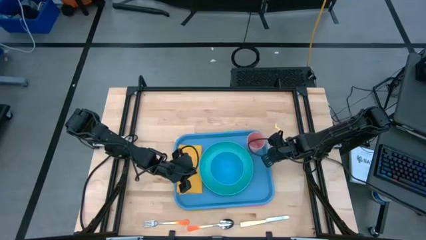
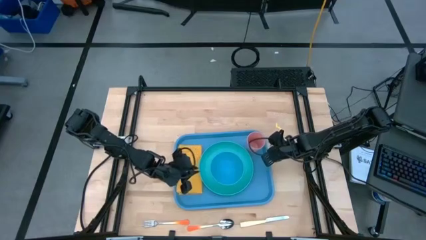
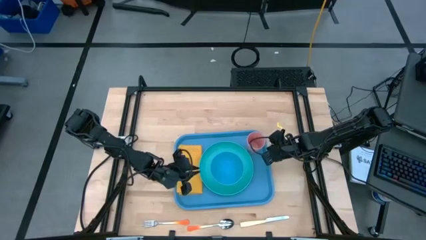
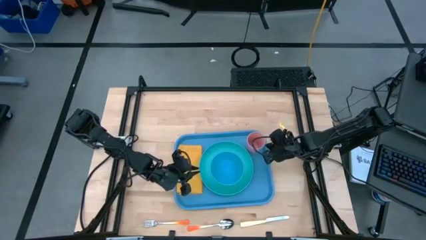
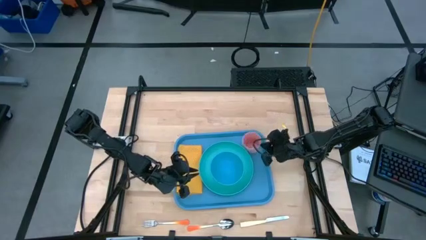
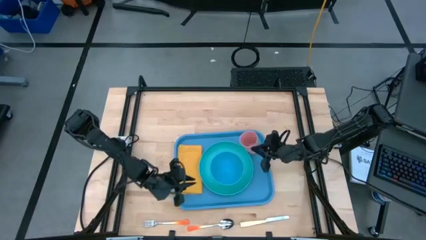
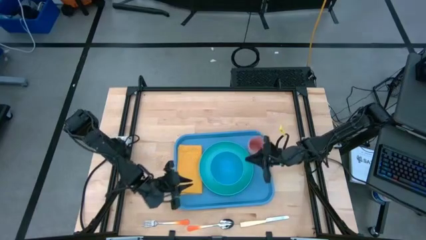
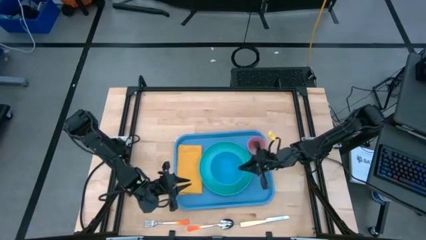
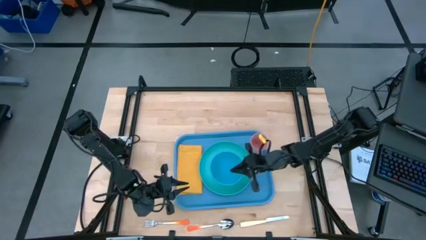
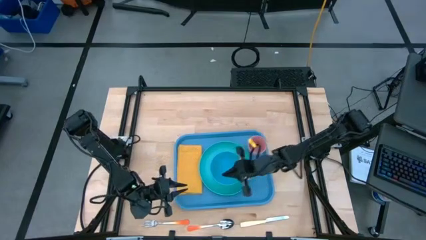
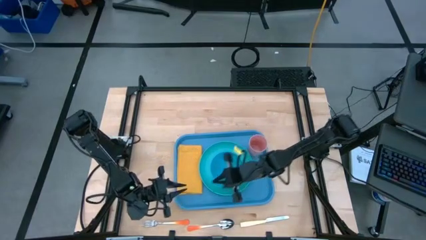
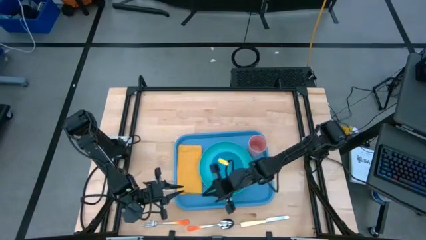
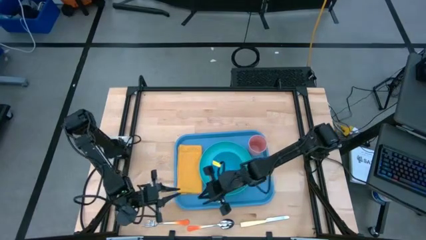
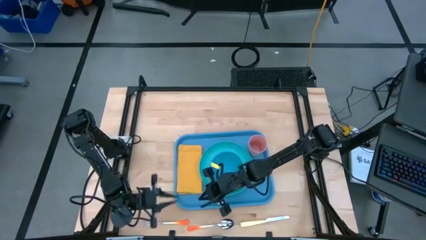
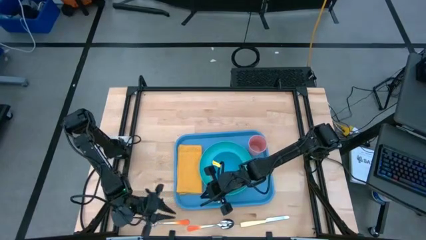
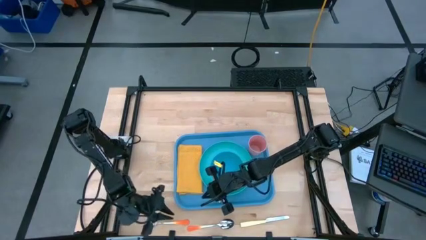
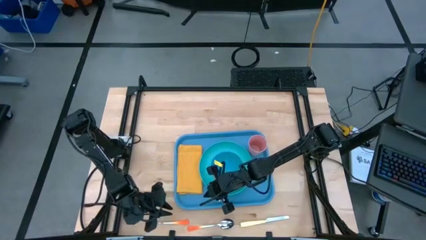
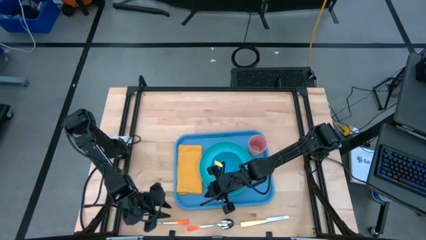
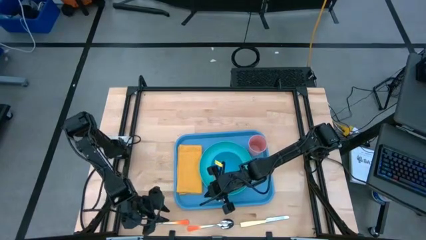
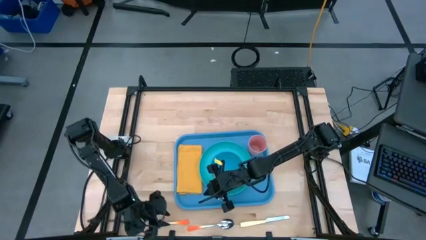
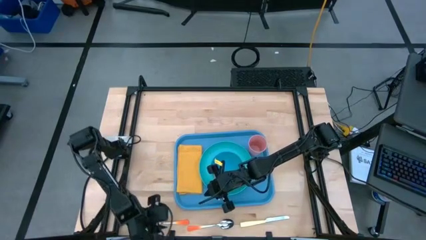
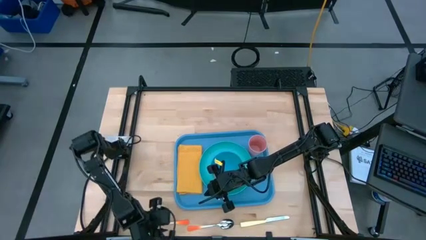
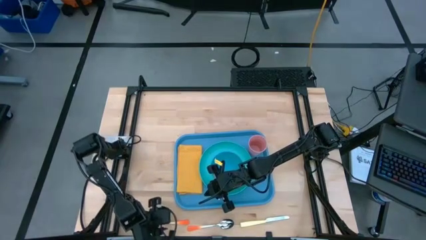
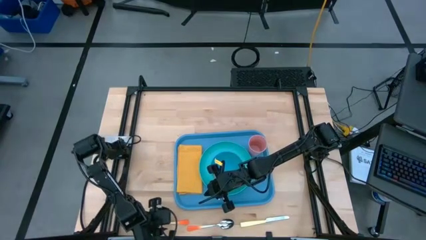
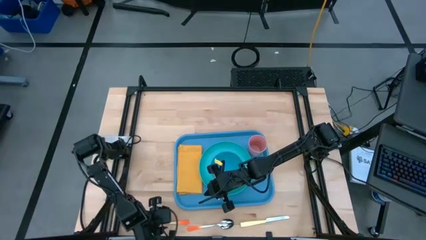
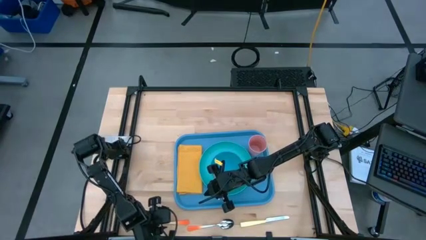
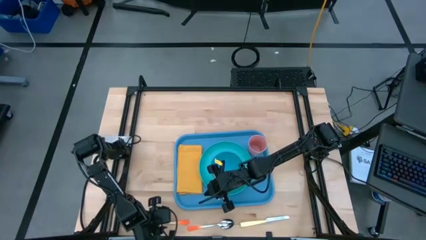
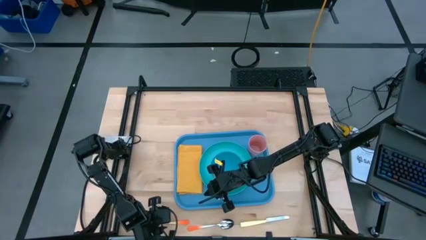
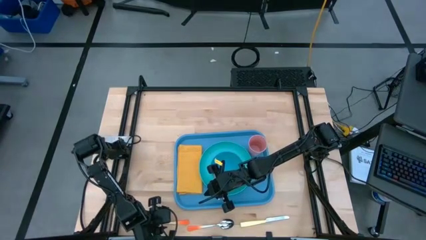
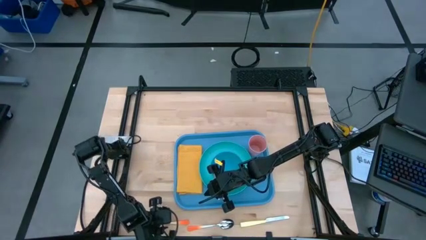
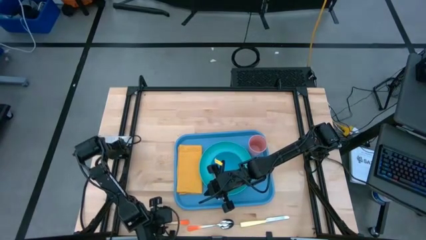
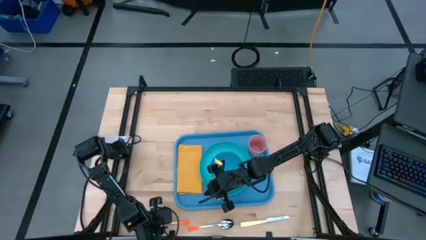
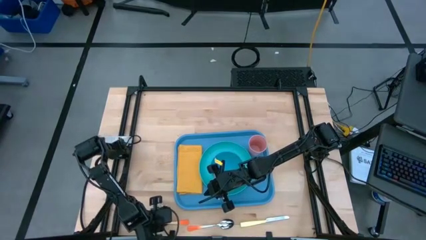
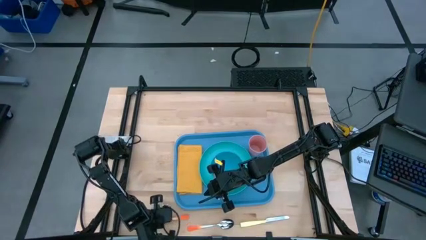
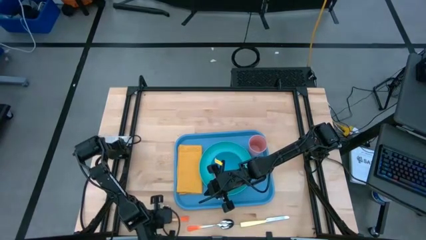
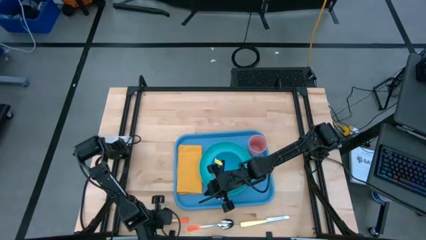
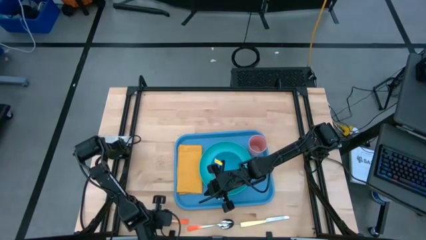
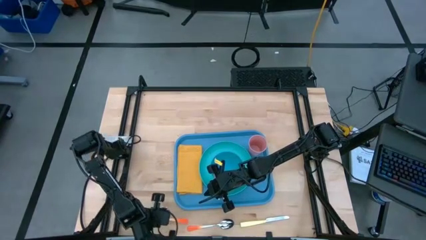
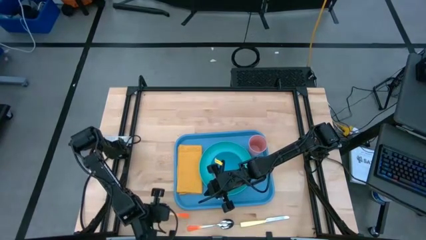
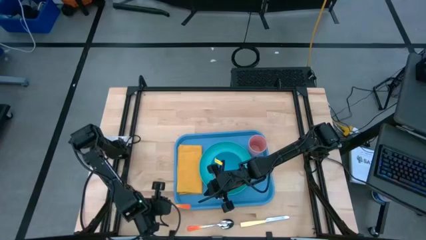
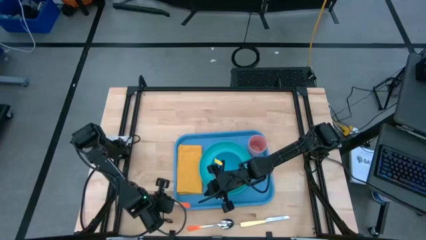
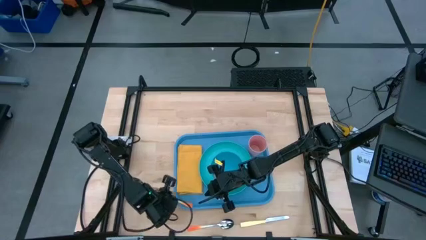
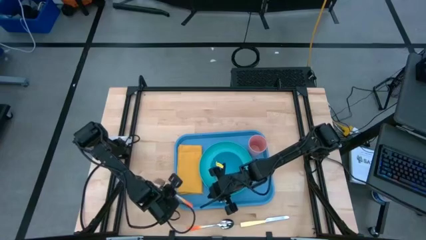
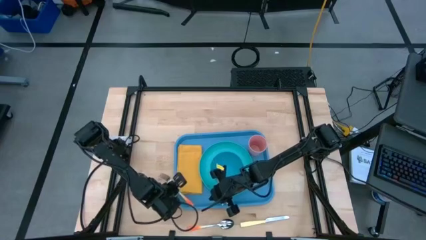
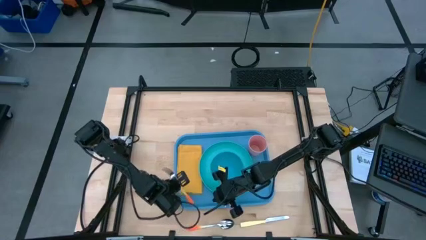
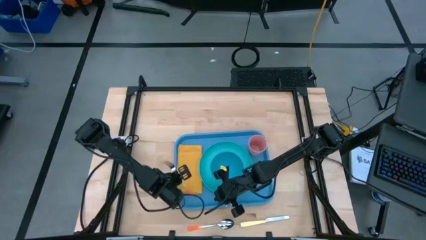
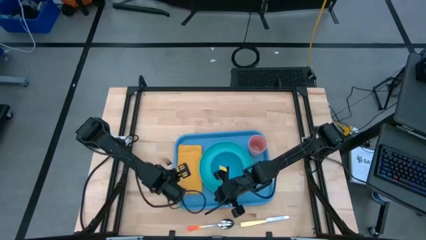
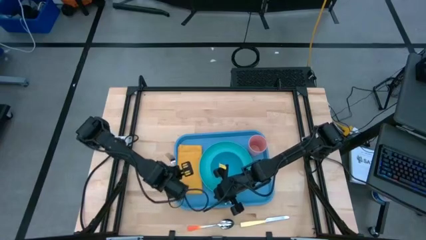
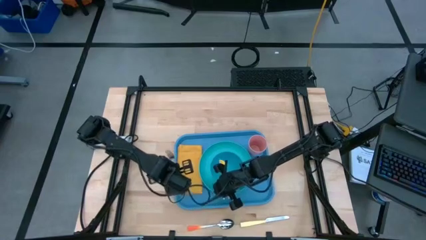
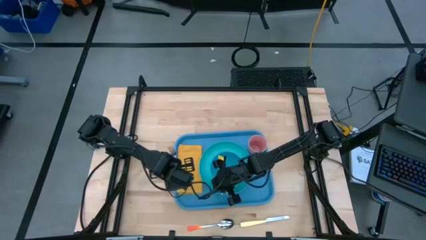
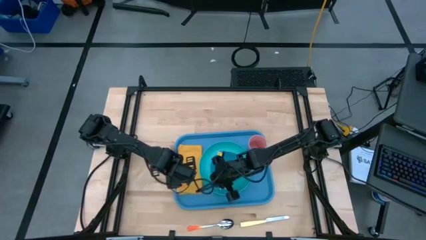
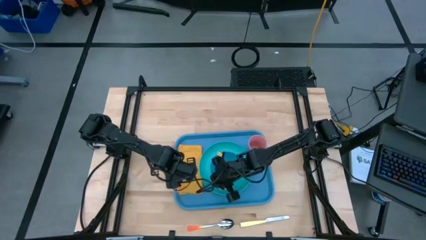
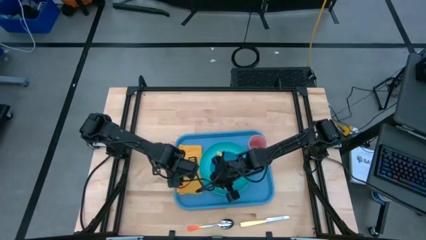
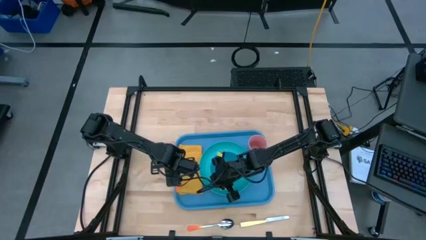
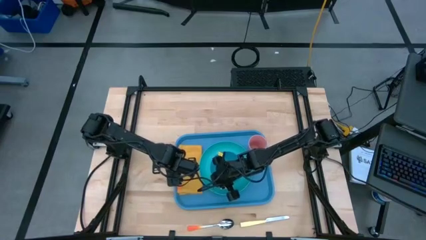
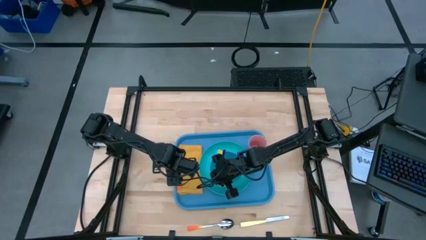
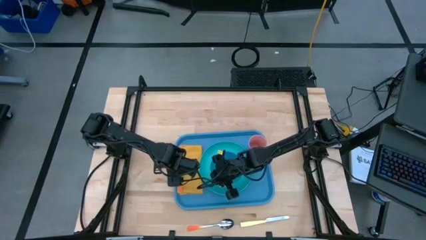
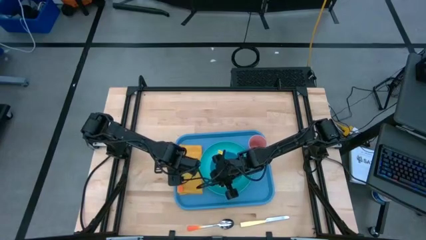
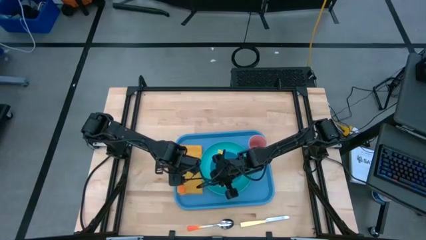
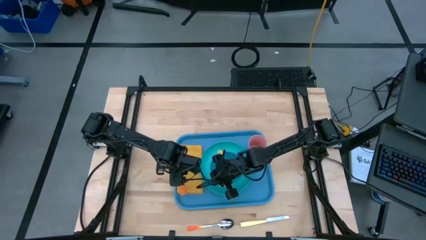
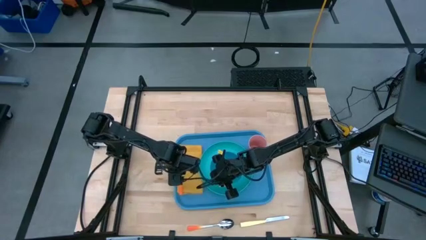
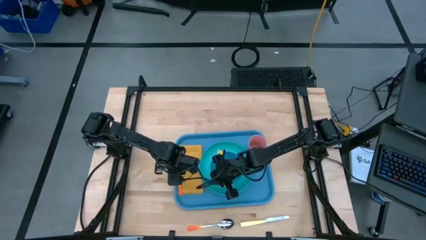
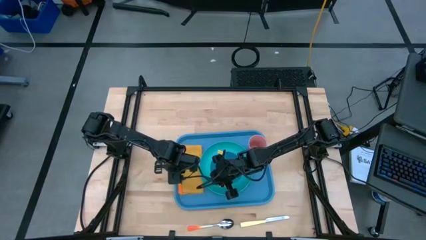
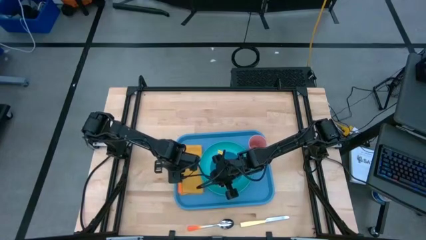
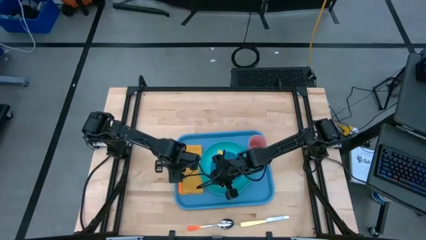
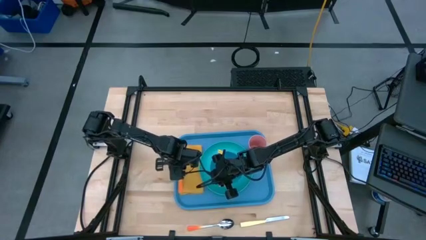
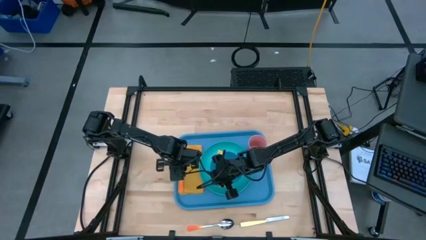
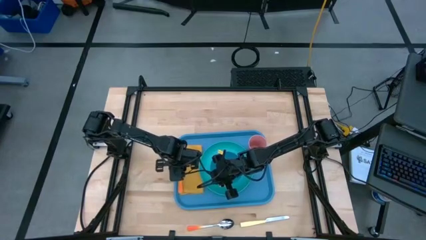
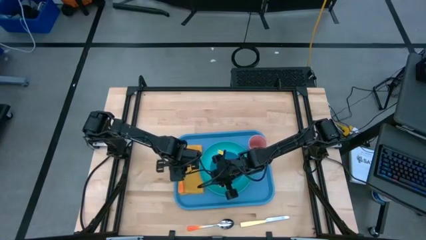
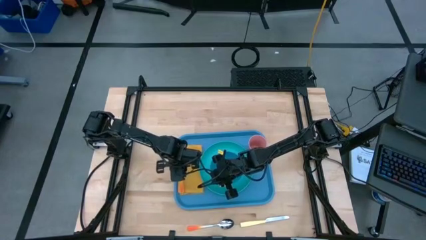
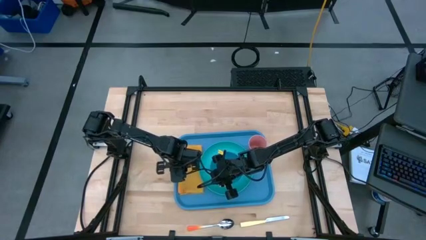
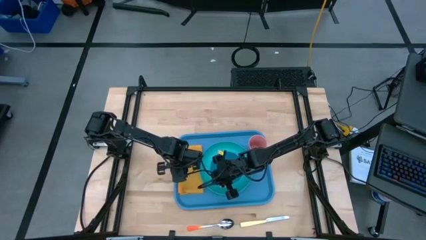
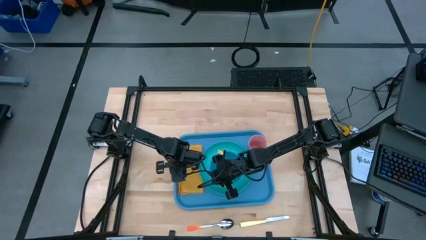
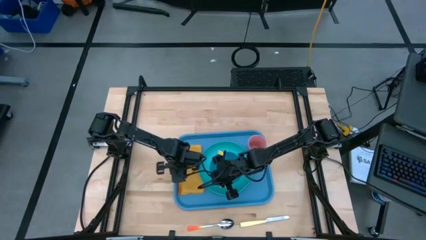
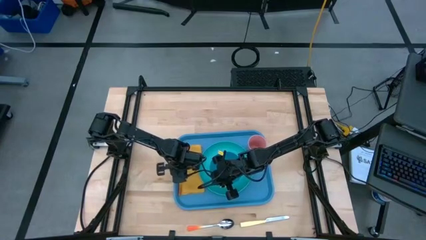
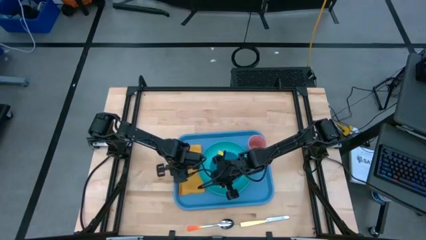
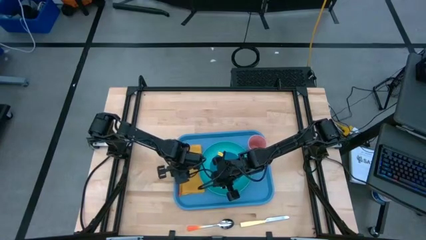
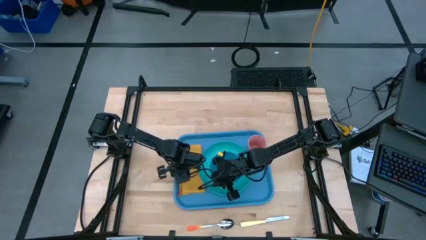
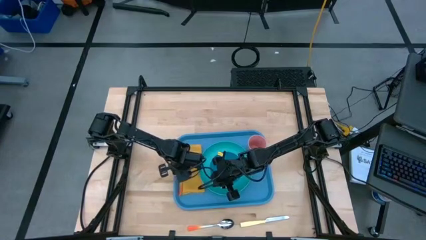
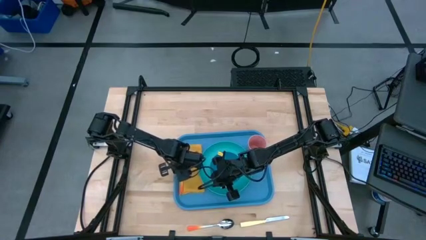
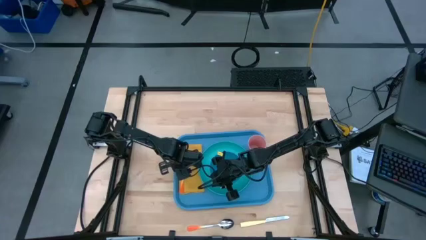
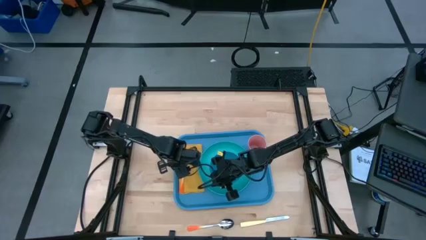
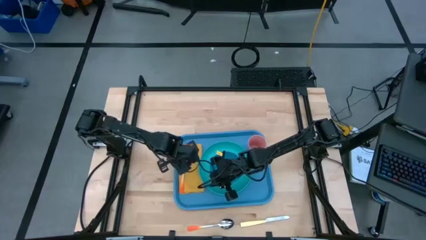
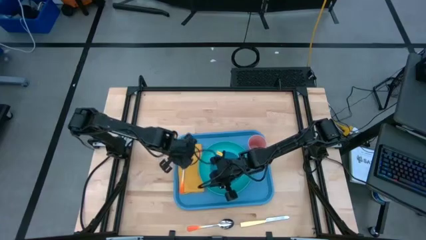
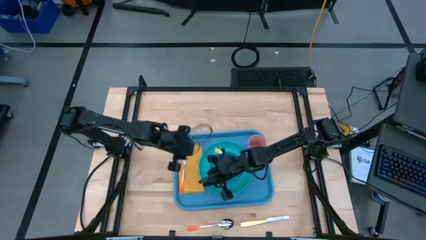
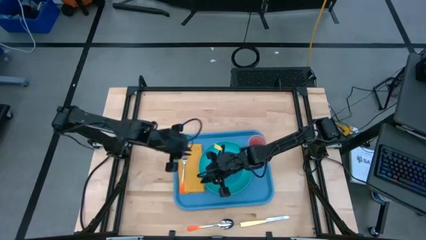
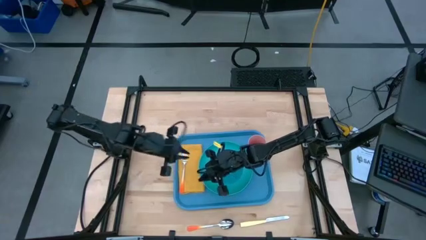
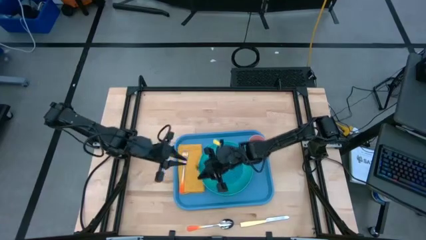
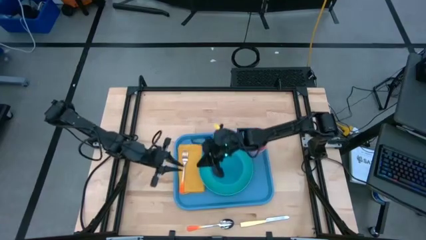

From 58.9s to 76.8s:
Task: Set up tray
Put the orange fork on top of the yellow napkin
